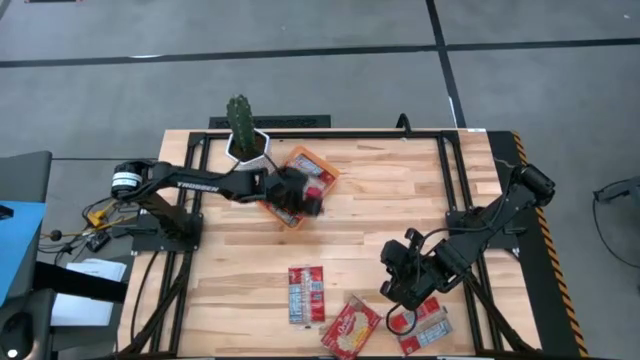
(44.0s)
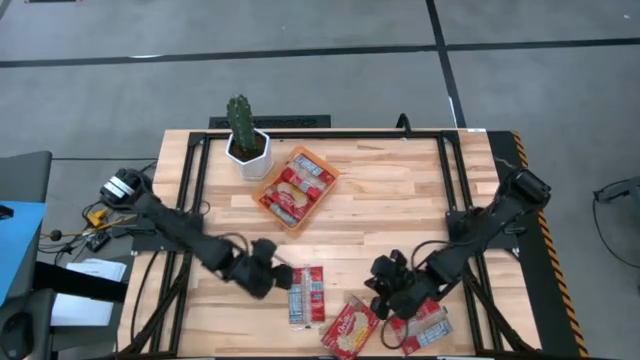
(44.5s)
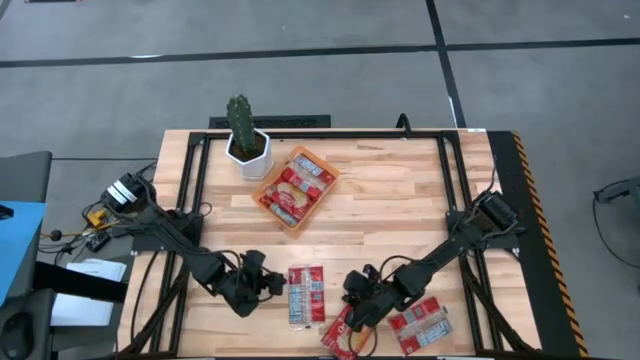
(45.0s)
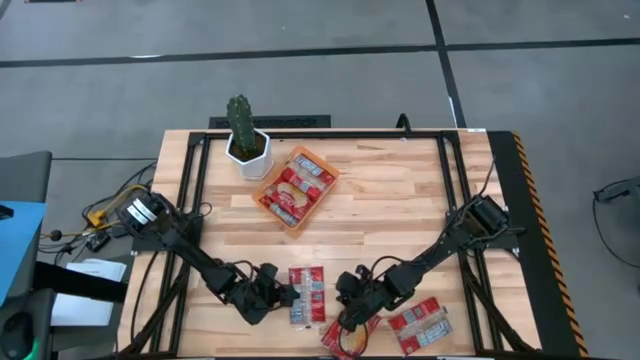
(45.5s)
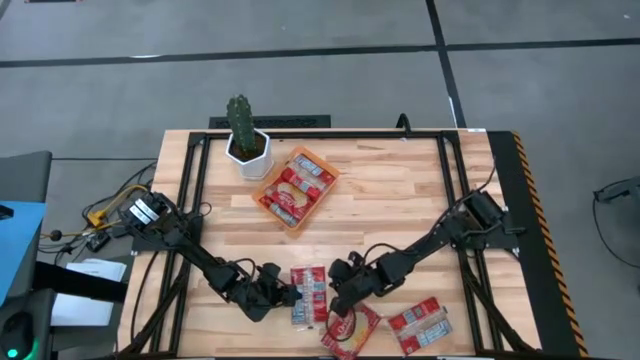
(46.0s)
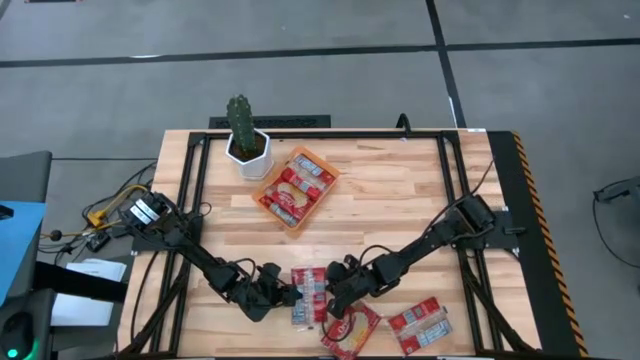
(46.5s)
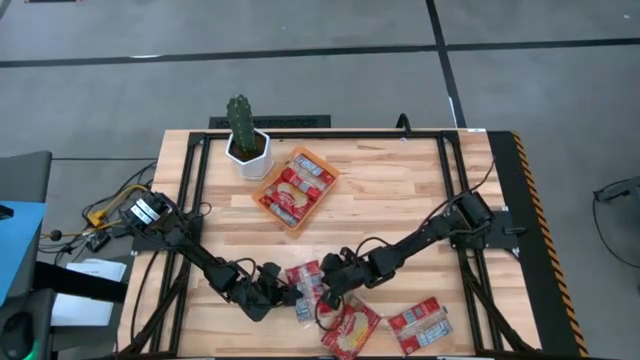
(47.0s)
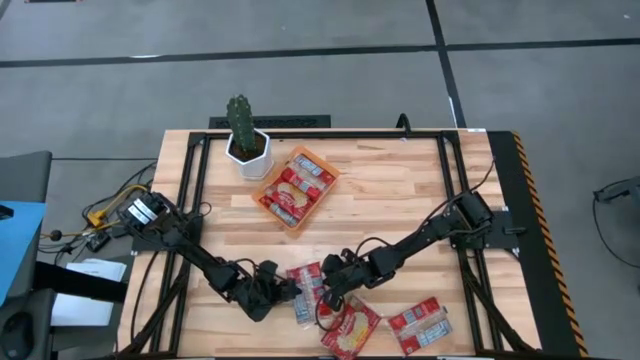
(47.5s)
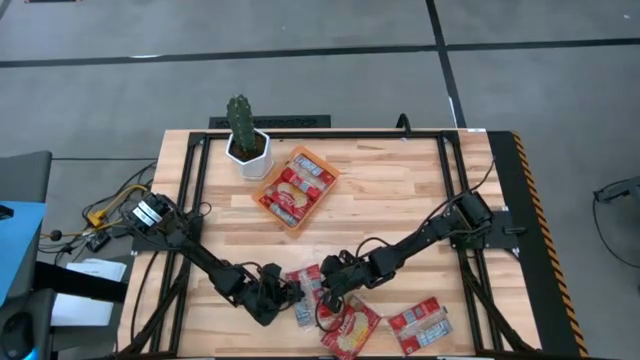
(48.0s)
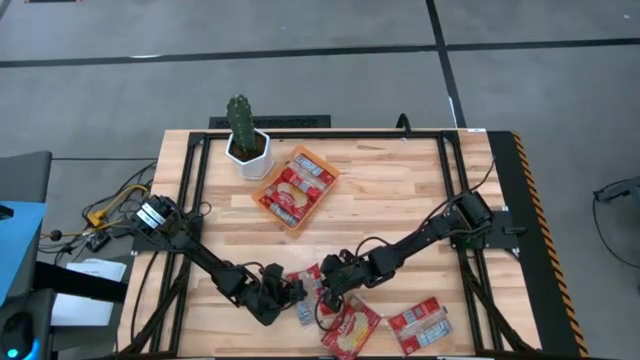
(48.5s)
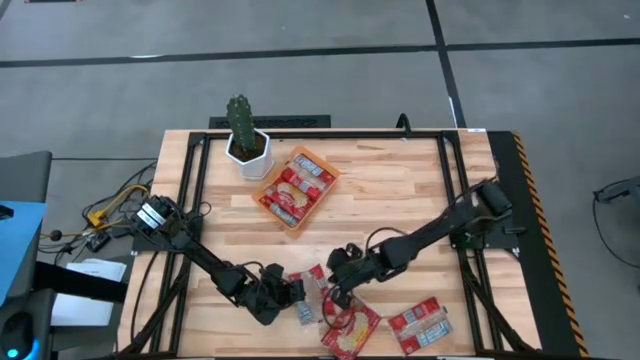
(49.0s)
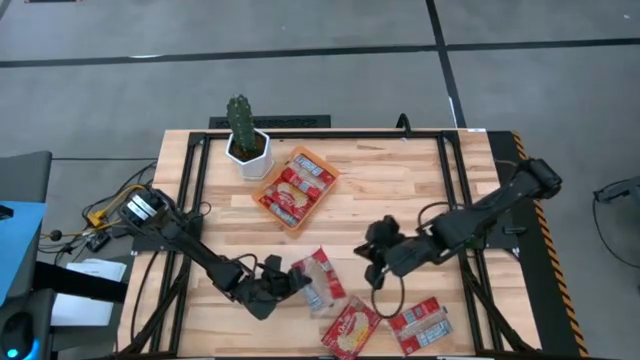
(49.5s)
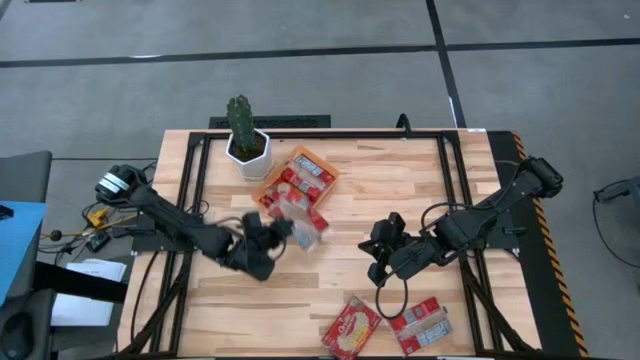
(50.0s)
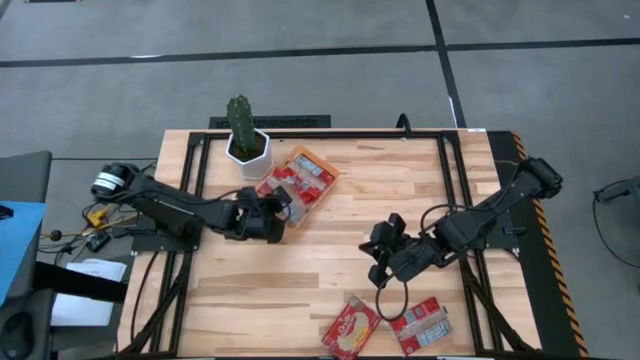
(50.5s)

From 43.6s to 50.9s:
Task: Sort popcorn bags into baskets
Put the popcorn bag into the orange bin

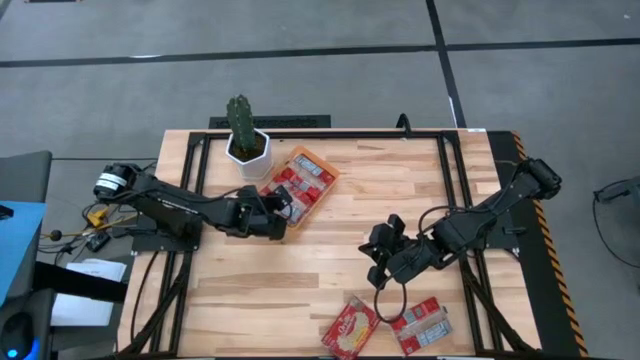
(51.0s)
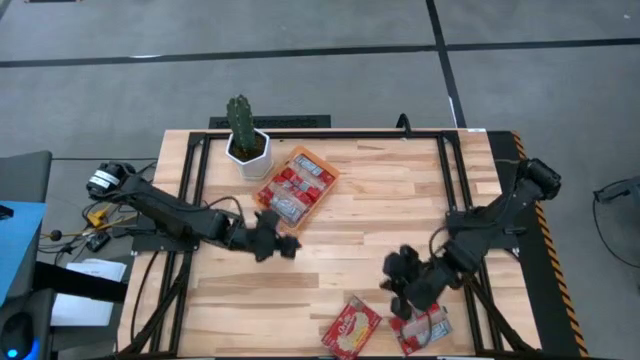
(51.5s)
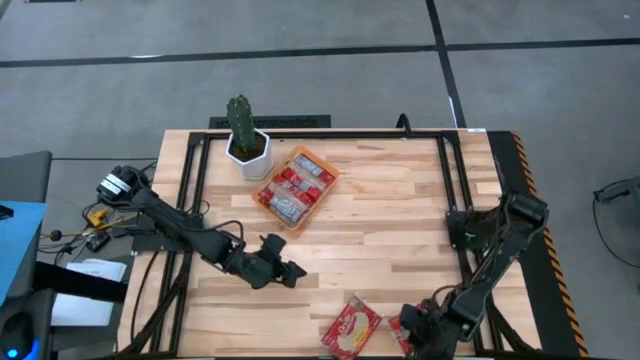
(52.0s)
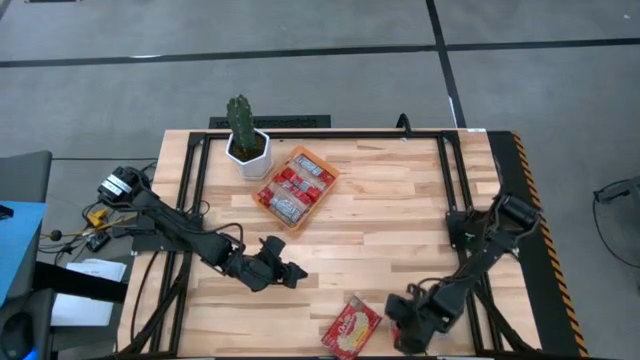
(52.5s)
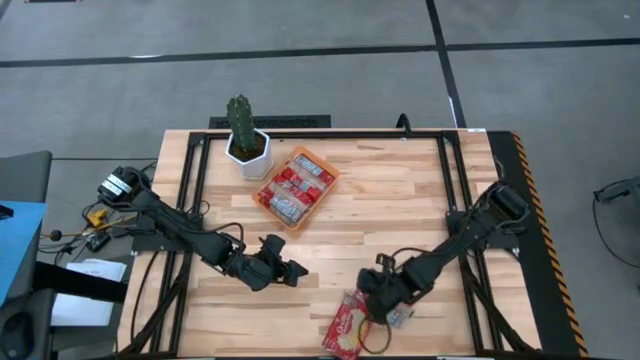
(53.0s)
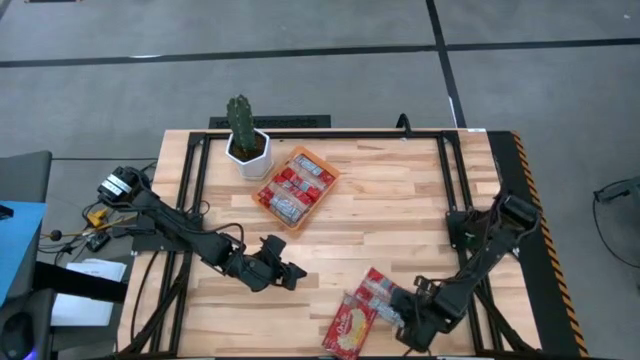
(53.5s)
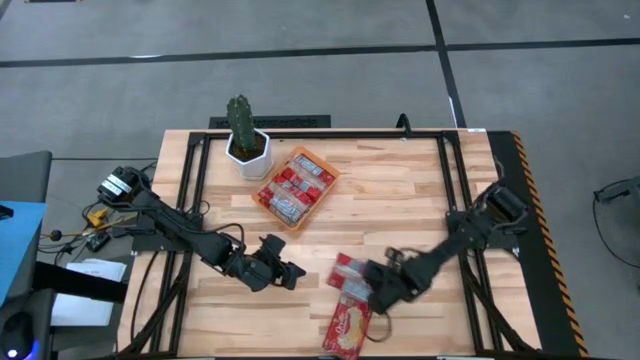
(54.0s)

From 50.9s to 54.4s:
Adjust the red popcorn bag

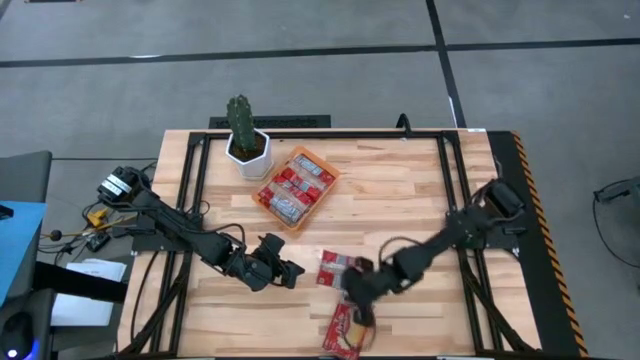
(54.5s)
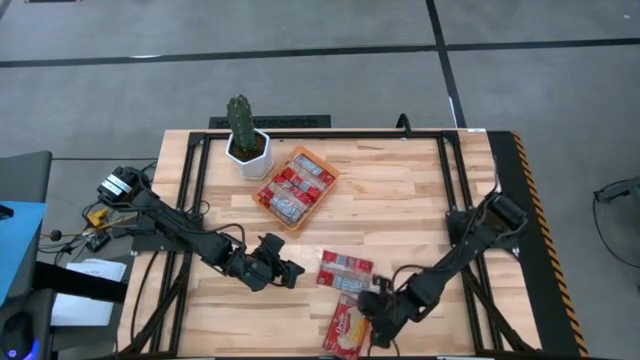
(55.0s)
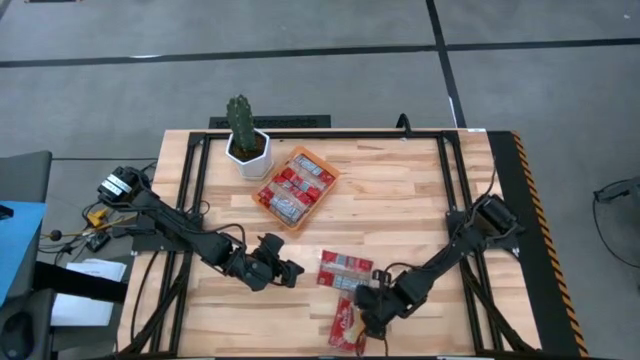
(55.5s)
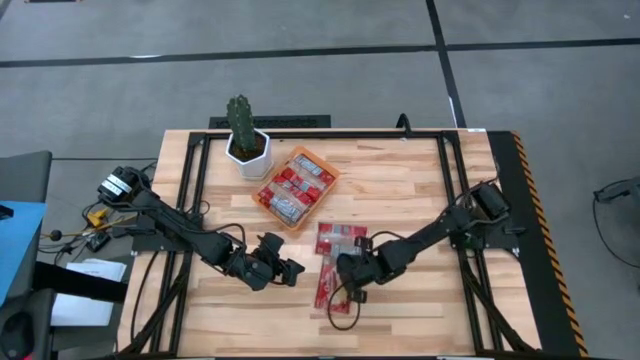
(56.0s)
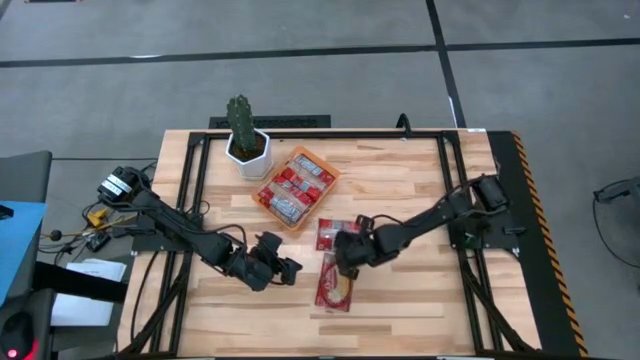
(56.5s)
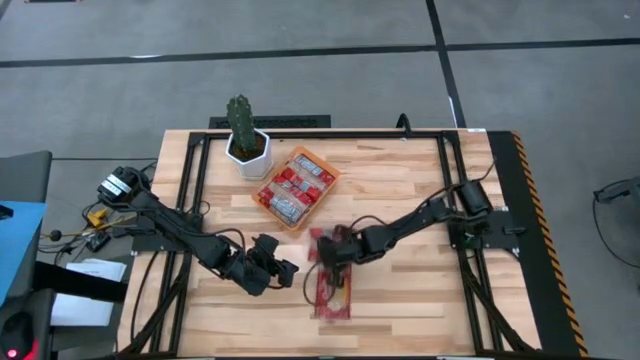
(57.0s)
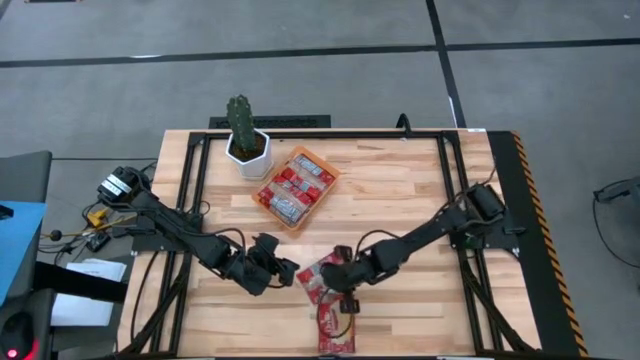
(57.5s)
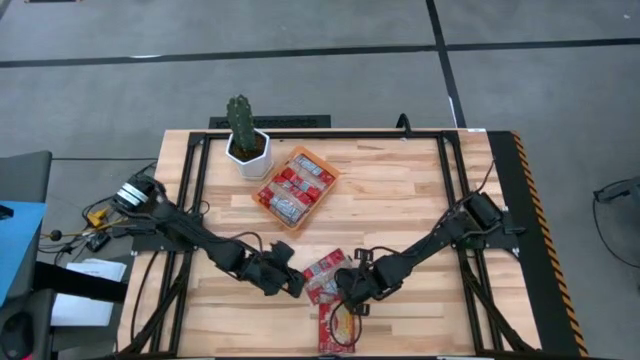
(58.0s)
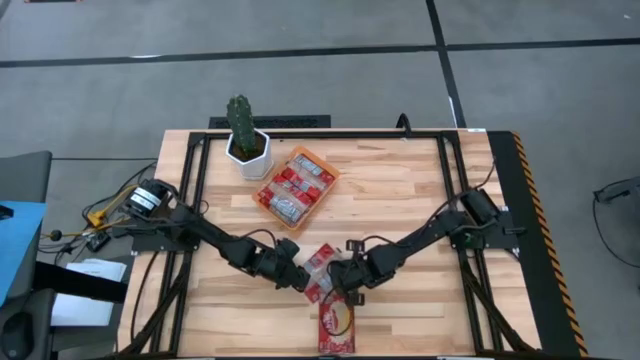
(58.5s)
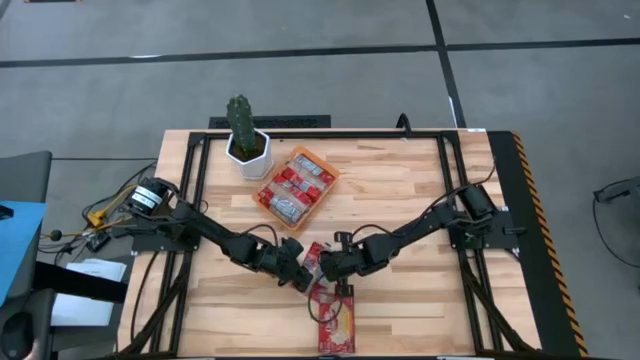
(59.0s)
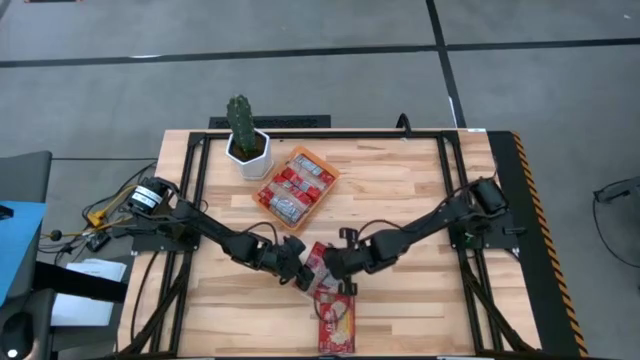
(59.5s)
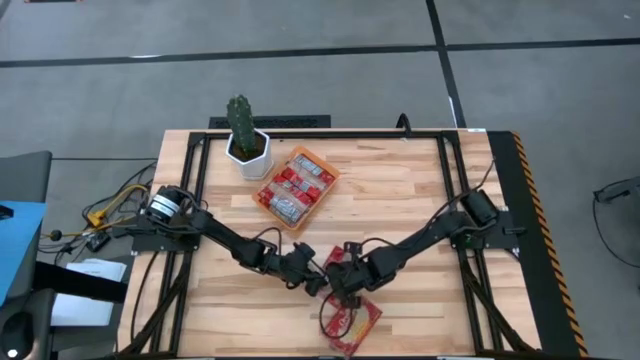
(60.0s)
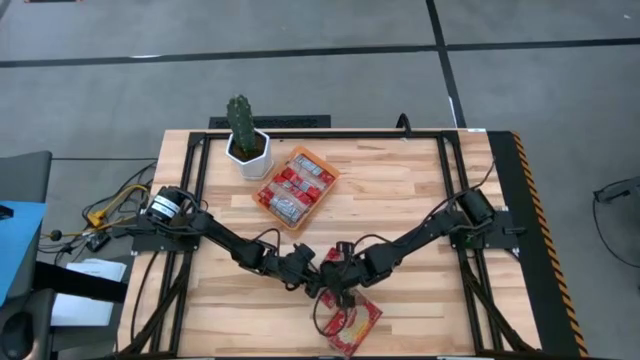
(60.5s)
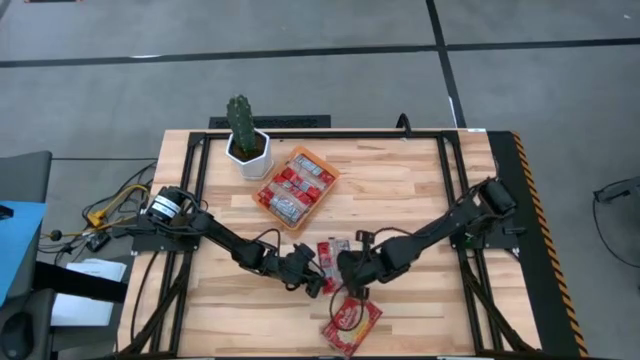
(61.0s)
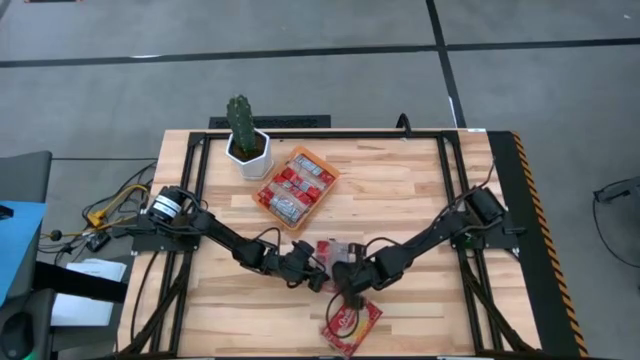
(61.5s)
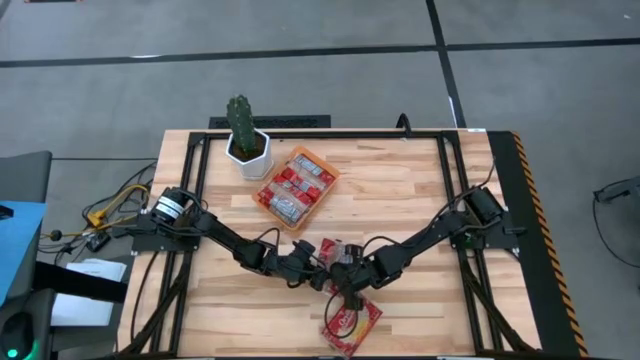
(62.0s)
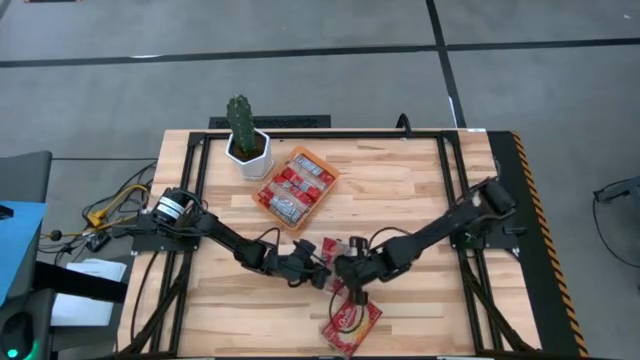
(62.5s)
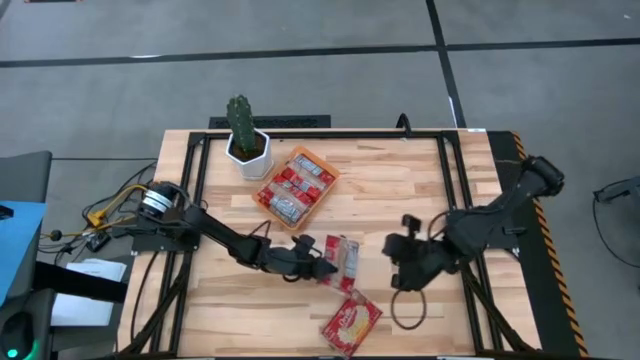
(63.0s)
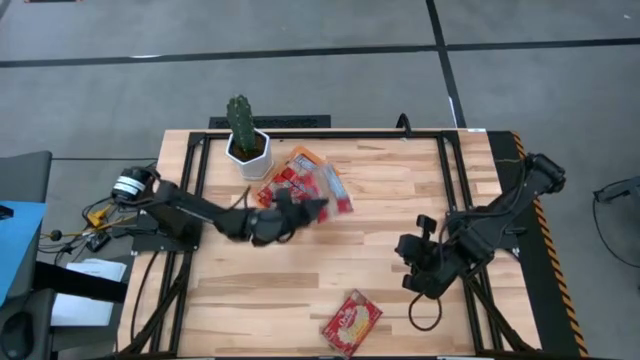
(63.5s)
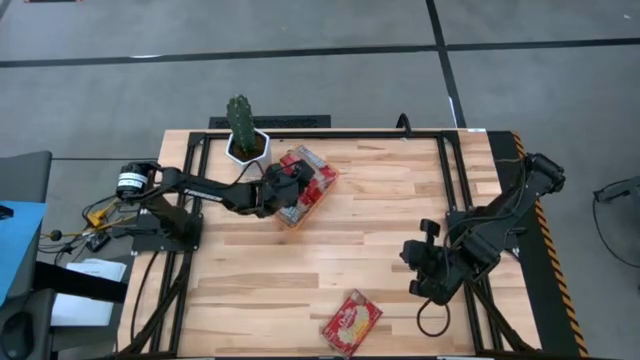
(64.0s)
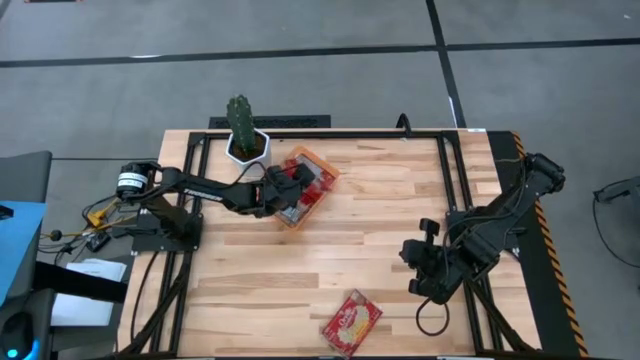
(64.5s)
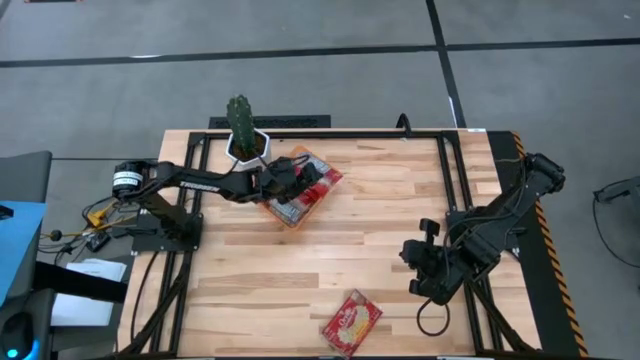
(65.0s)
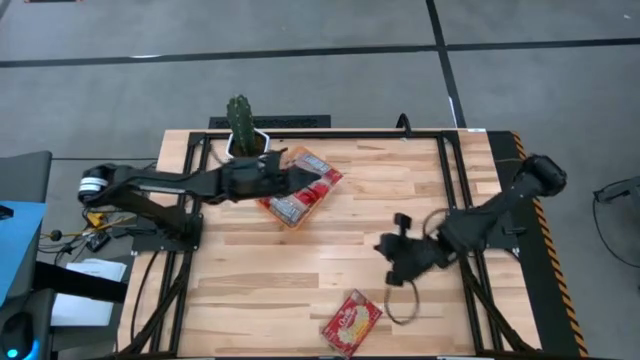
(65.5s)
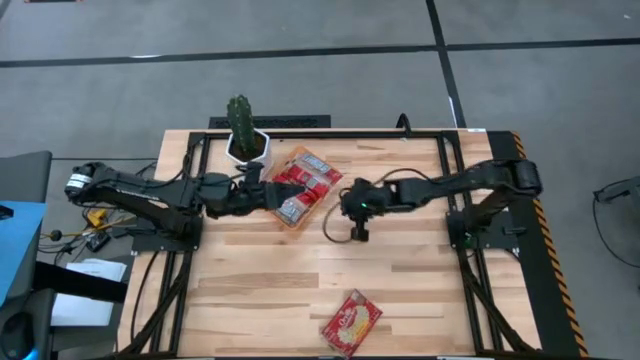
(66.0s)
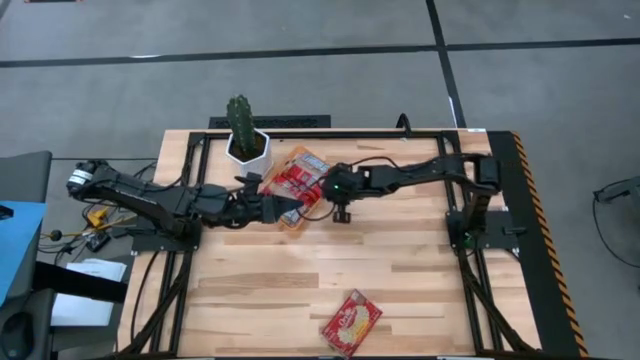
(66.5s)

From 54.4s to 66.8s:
Put the popcorn bag into the orange bin
